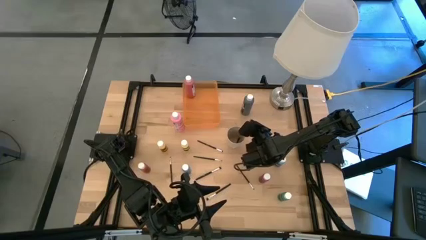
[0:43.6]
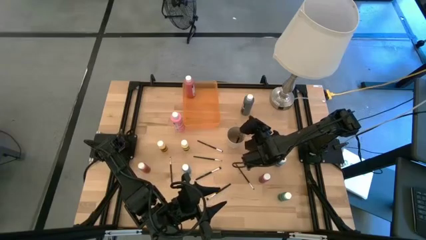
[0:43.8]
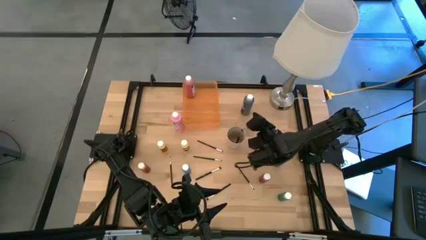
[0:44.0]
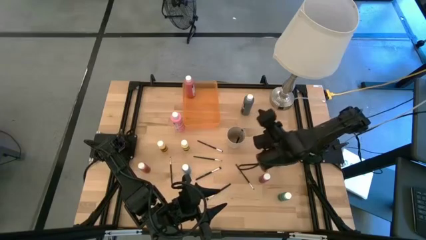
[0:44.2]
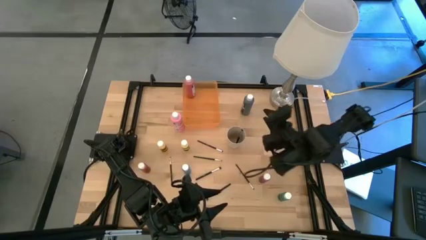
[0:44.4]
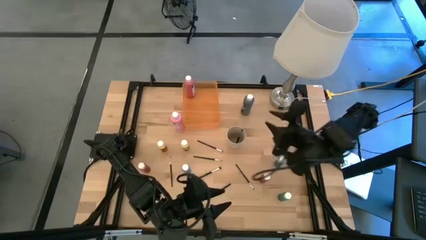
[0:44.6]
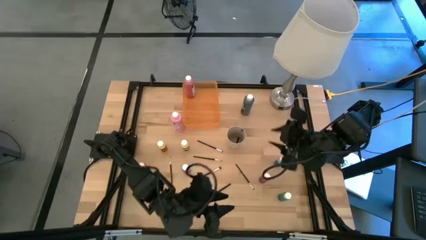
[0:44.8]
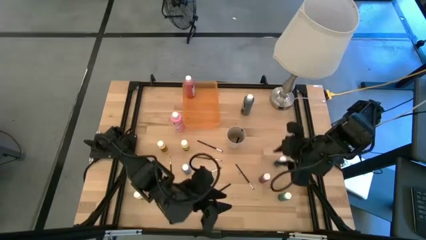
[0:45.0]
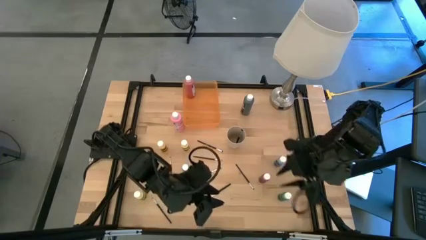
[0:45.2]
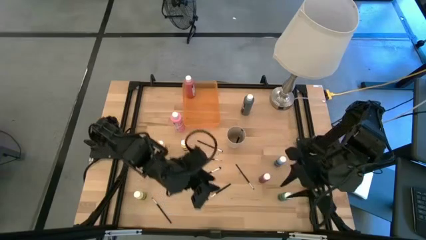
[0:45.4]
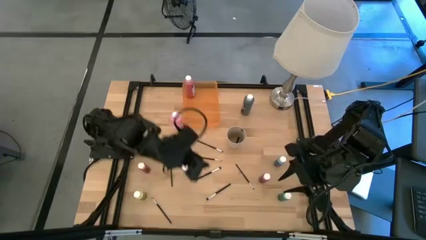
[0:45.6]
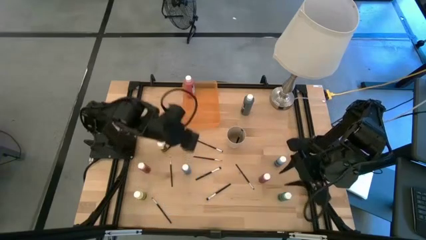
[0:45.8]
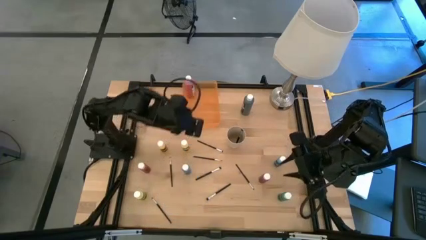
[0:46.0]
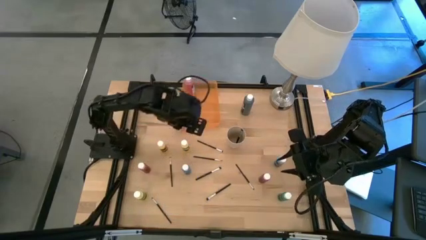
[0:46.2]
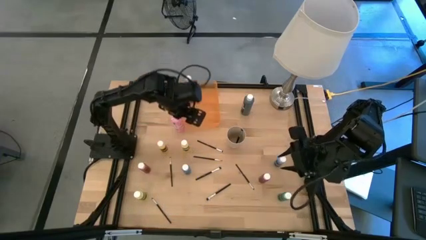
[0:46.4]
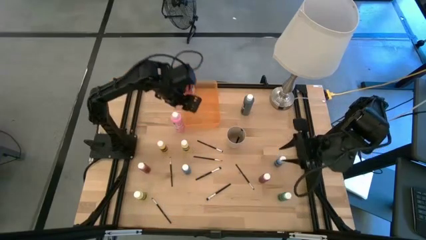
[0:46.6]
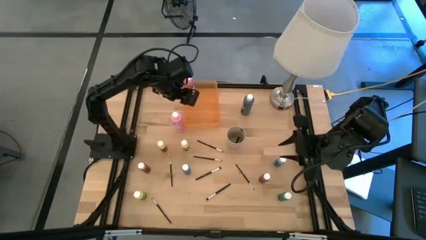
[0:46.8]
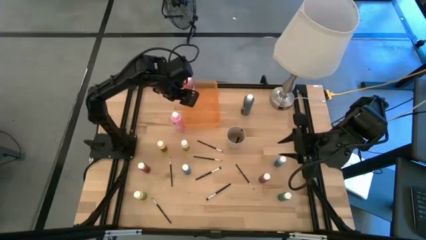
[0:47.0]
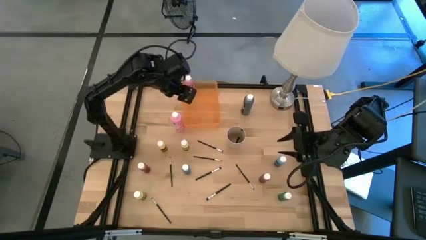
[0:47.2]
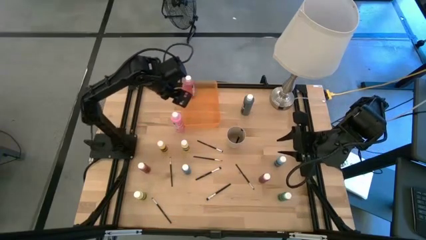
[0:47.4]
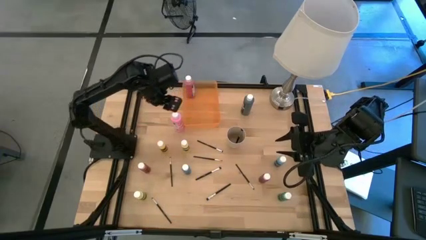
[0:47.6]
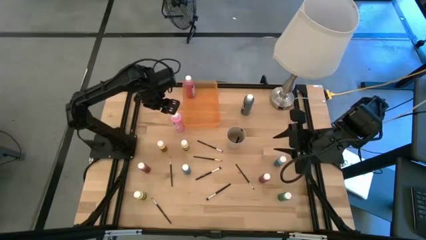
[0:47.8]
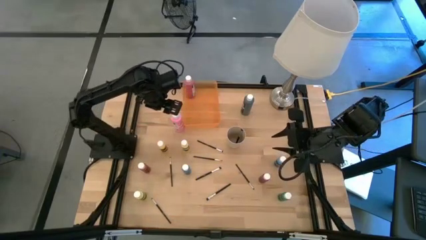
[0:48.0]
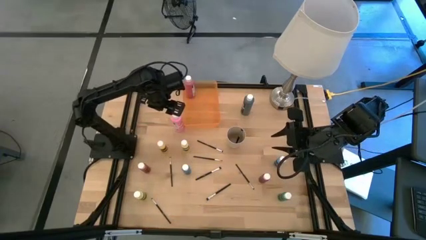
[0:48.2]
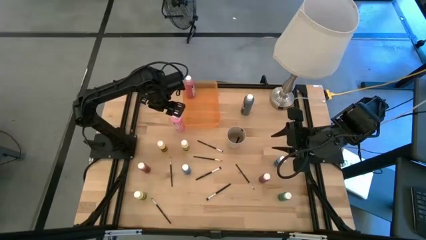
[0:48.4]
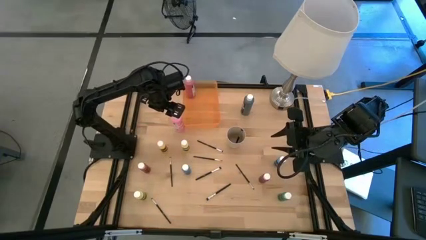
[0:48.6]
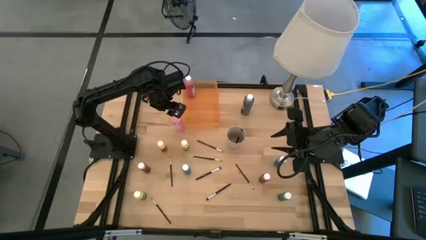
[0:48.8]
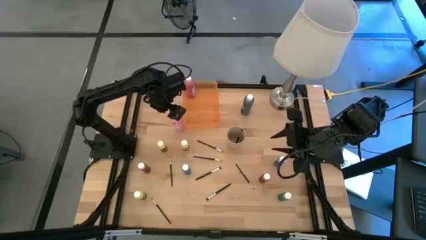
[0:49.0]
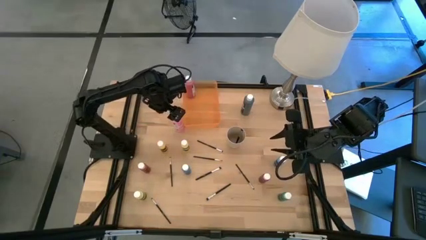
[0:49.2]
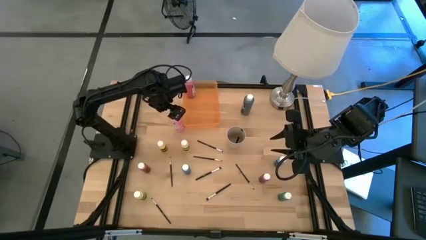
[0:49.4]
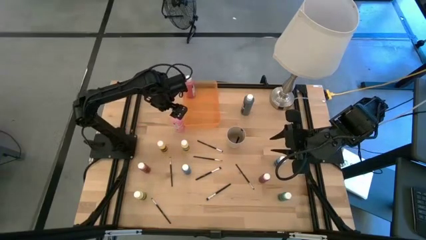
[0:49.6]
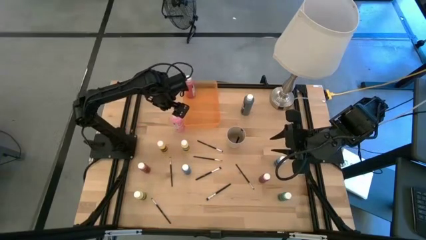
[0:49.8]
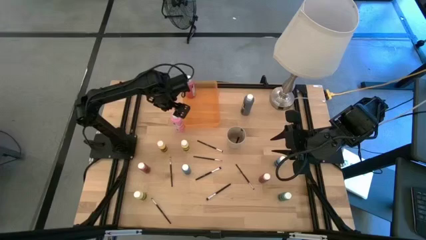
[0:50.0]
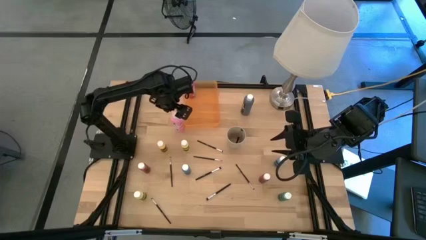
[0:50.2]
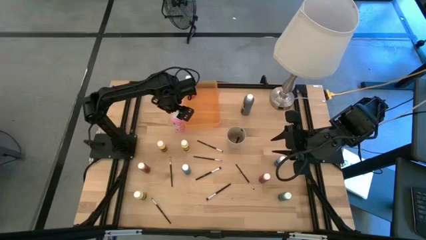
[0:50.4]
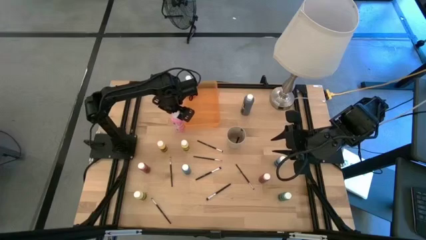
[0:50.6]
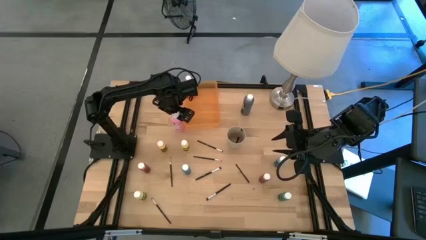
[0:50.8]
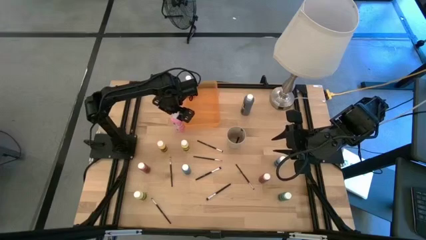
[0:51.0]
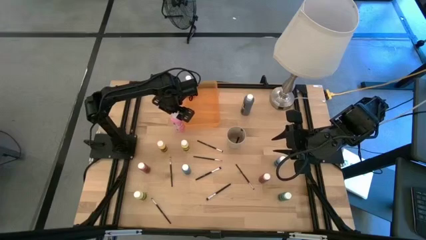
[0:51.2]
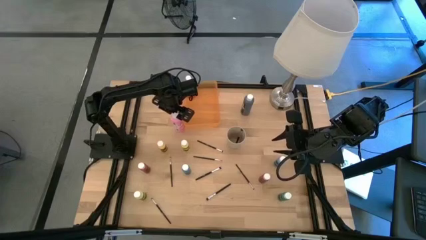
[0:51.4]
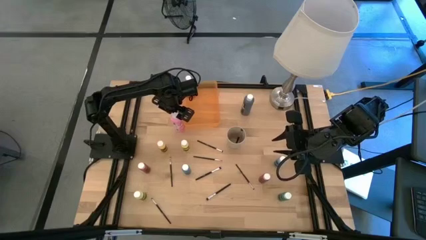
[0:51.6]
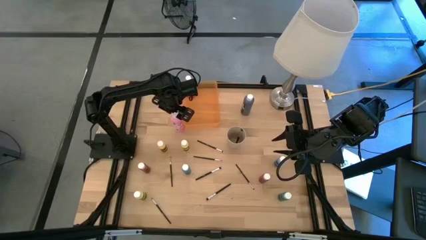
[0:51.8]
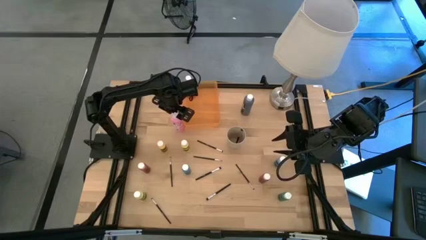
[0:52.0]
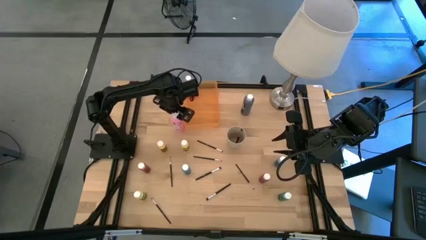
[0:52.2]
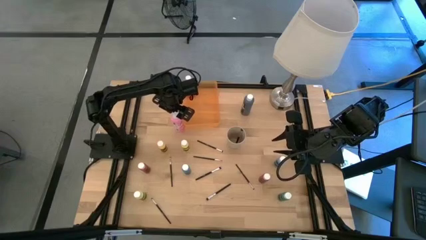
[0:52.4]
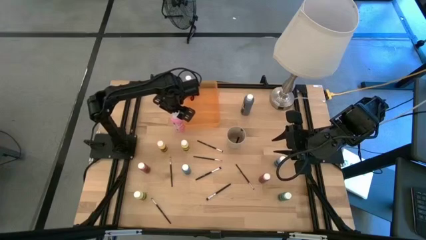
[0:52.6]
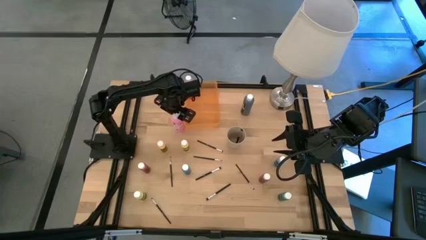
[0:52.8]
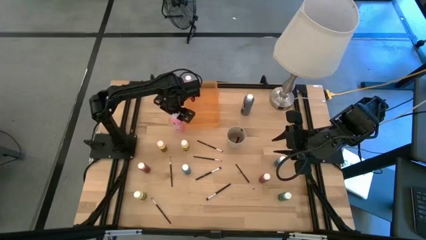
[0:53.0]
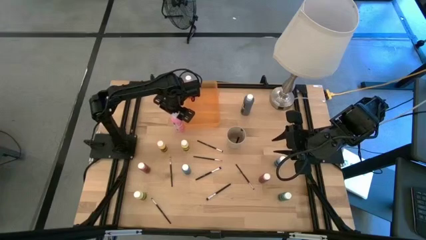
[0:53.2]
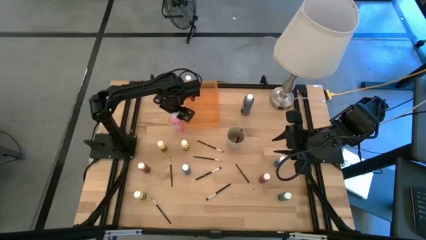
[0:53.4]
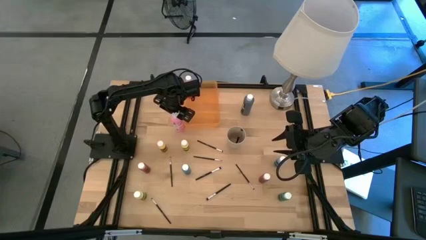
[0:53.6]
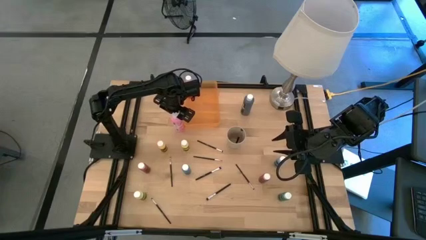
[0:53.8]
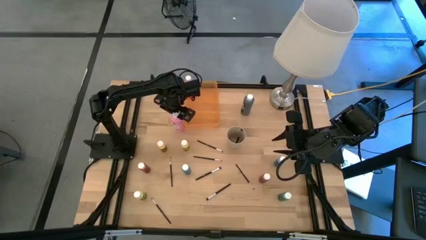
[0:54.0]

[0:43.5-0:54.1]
Task: Pick & Place Paint Supplies
Put the large pink paint bottle into the orange bin

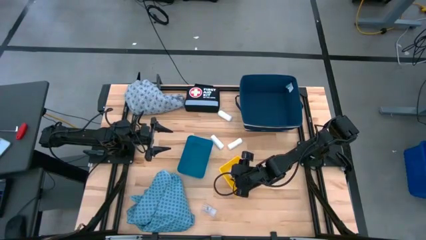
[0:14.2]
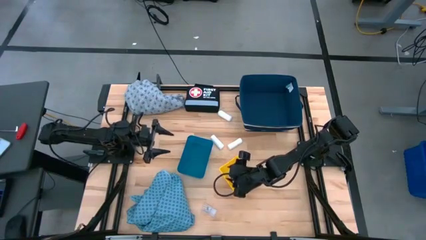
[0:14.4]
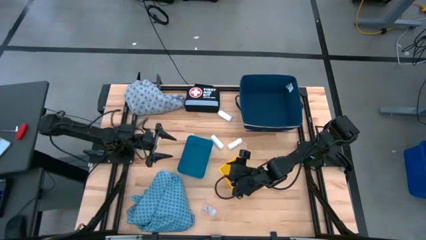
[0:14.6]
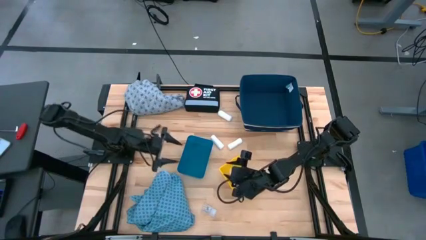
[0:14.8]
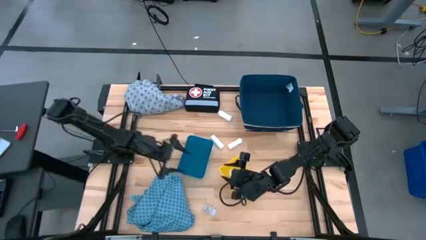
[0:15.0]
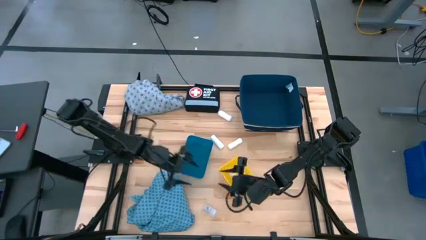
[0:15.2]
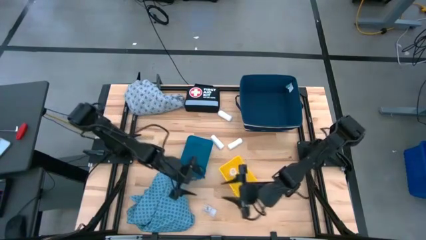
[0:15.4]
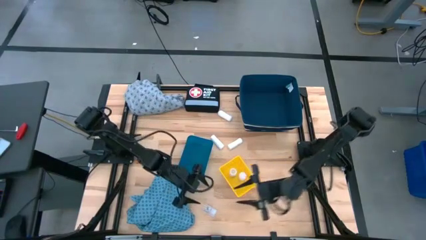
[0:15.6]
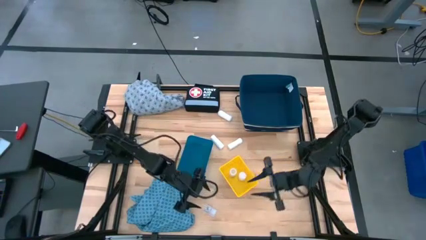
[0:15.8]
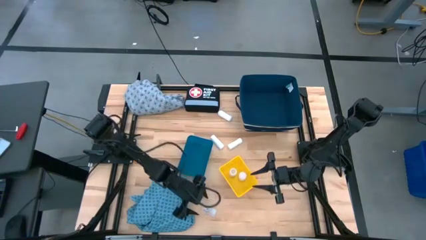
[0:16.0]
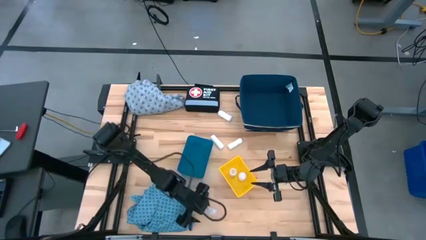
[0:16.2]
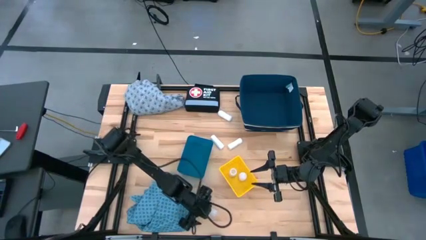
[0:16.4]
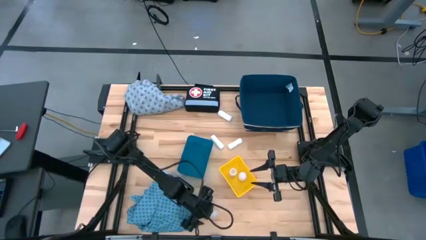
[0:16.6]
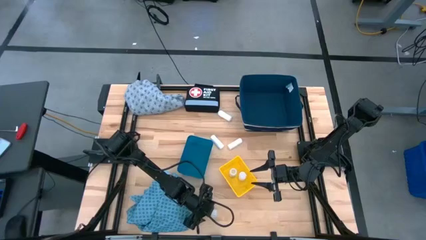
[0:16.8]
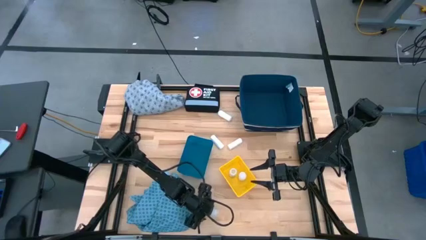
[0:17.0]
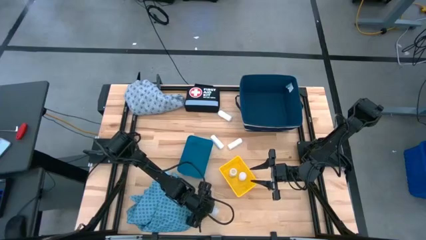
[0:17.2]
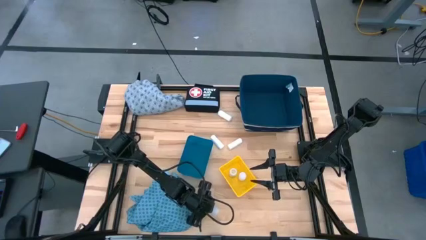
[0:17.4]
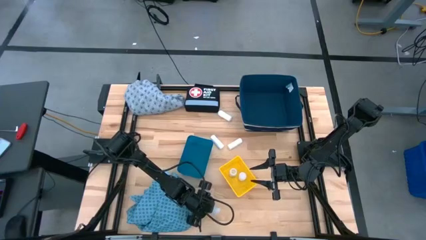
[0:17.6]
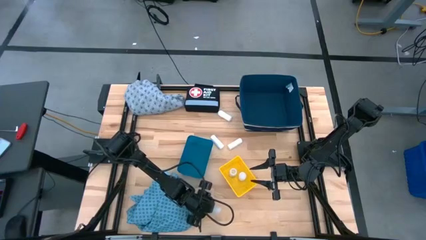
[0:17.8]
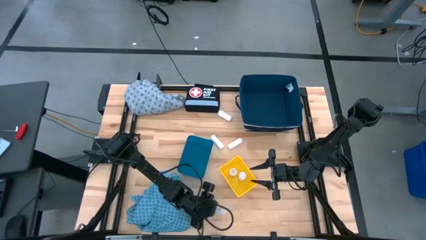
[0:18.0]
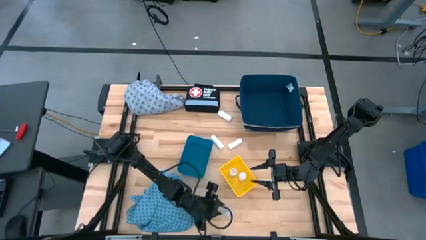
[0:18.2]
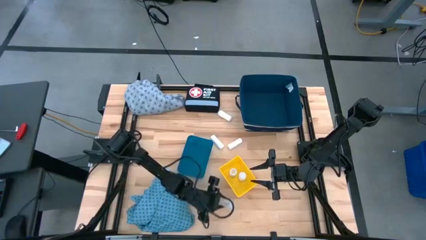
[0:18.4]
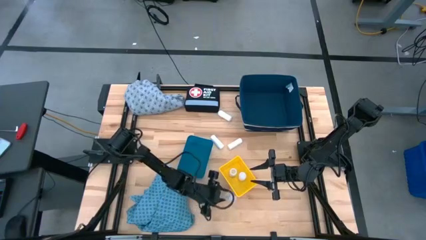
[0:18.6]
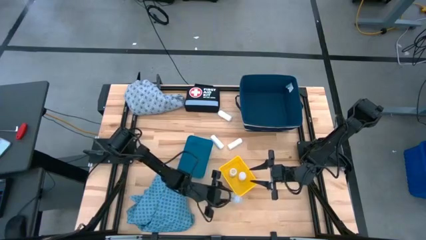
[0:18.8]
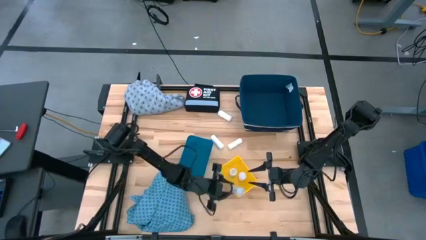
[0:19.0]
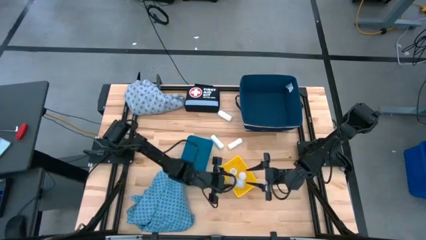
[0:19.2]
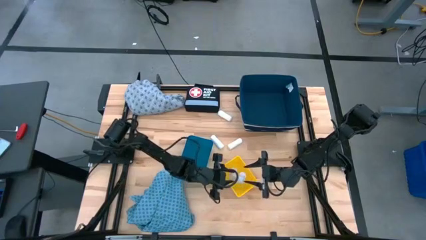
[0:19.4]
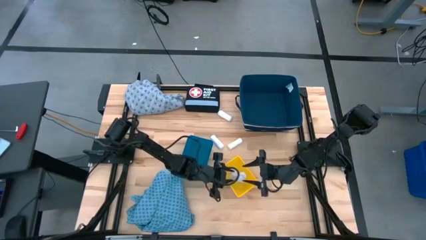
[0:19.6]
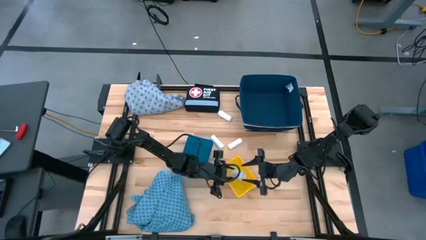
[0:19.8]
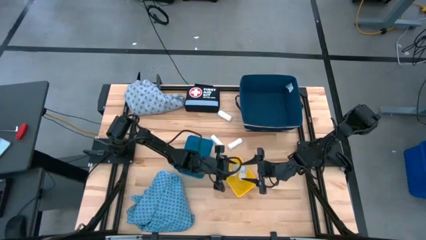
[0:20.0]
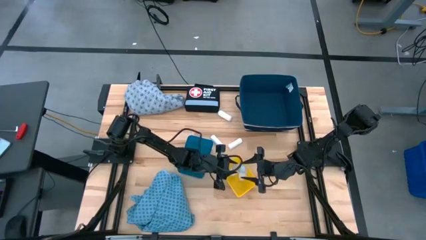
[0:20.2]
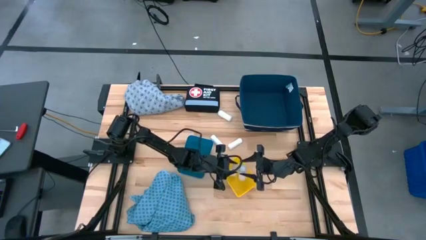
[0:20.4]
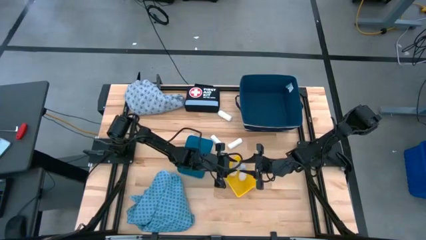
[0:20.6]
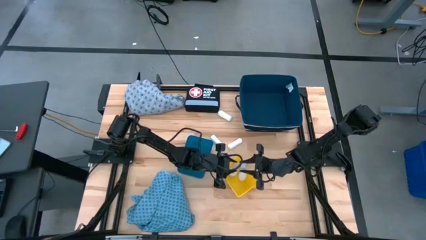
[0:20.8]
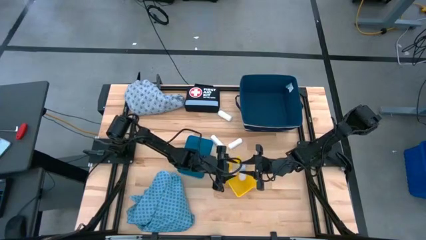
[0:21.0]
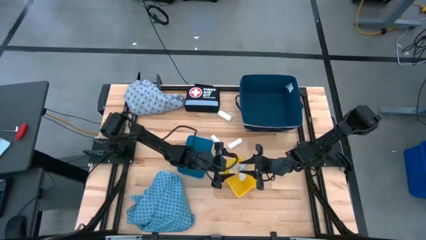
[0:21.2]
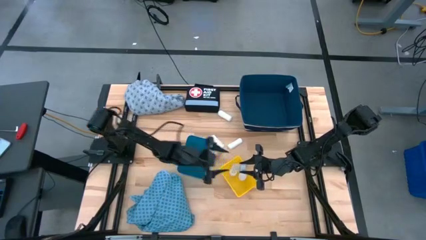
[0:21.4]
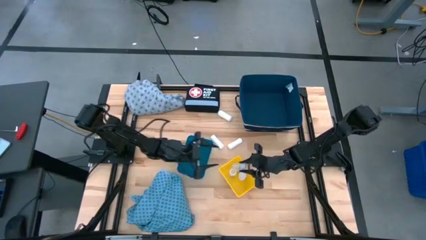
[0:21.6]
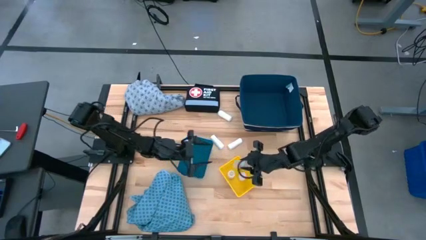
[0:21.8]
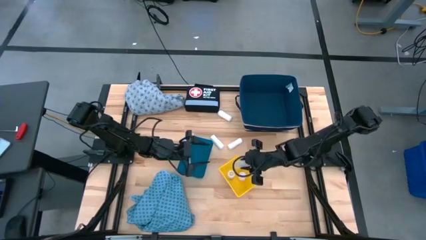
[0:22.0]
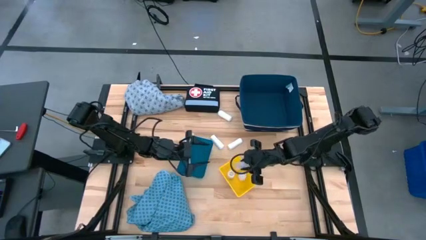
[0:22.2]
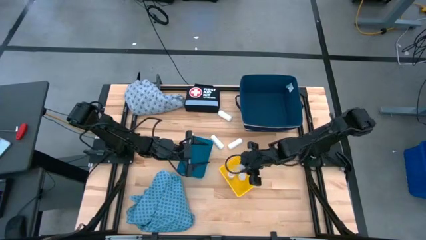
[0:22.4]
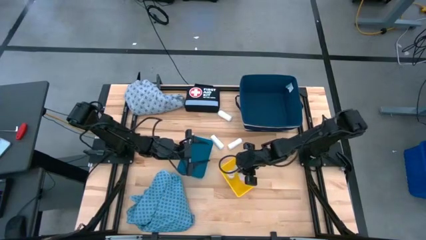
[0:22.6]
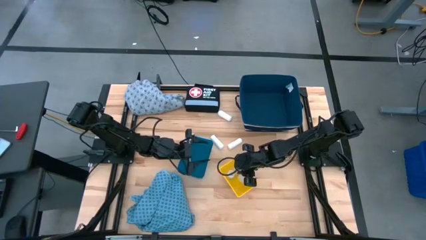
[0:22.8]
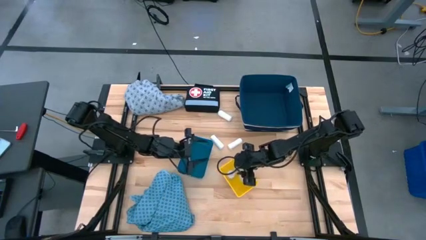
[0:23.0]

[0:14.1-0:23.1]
Task: Pick & place medical supplies in basket/bin
Put the white pill bottle into the yellow bin
